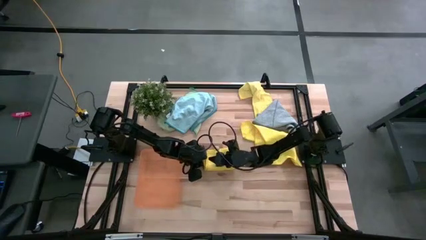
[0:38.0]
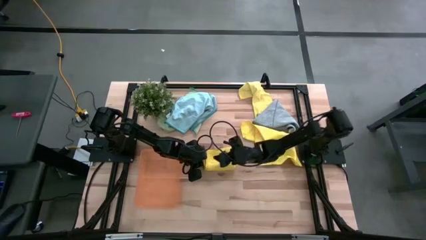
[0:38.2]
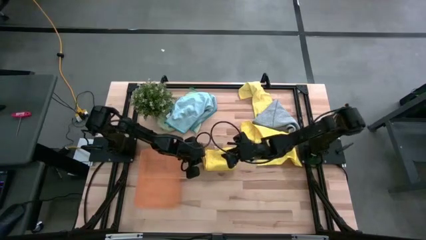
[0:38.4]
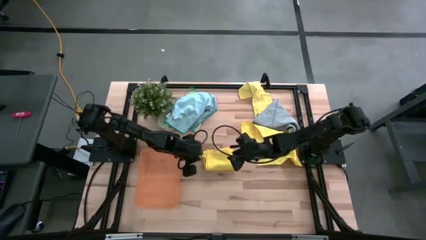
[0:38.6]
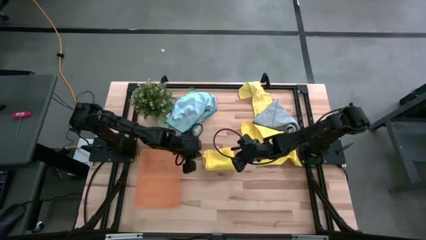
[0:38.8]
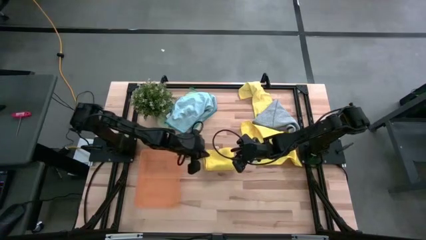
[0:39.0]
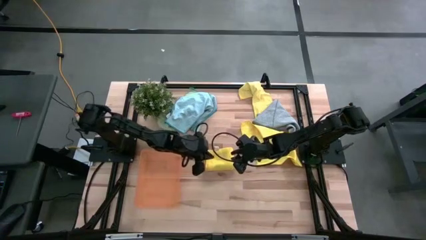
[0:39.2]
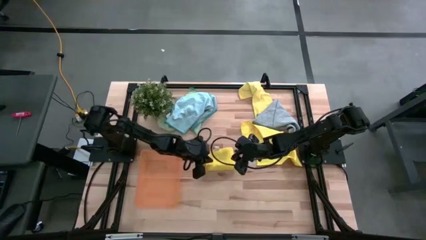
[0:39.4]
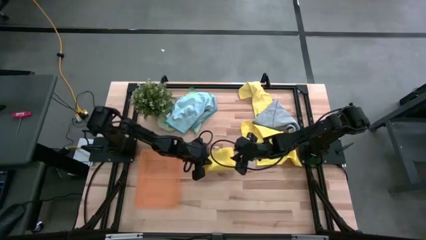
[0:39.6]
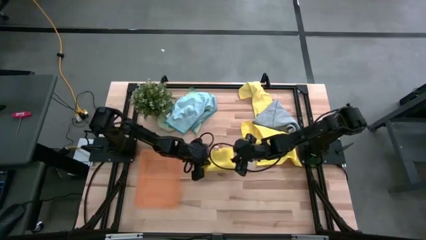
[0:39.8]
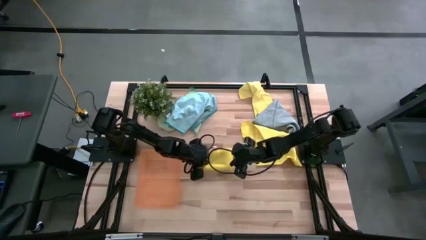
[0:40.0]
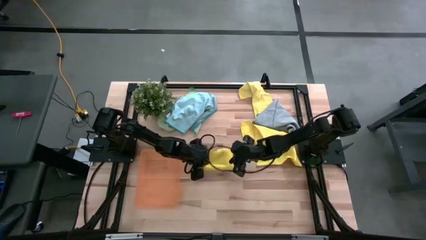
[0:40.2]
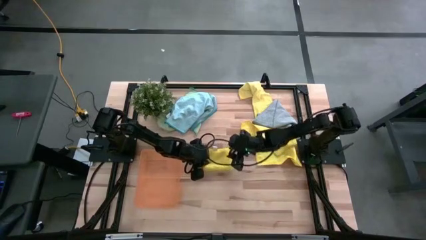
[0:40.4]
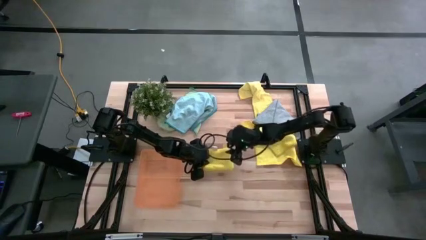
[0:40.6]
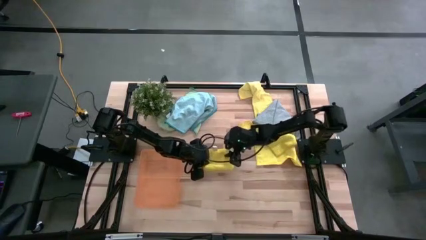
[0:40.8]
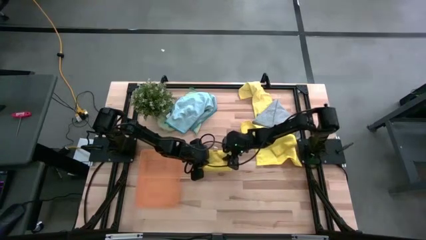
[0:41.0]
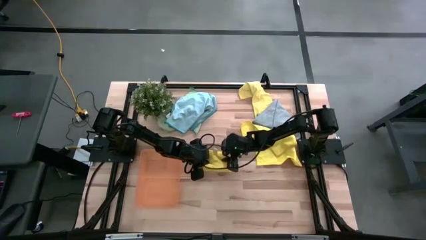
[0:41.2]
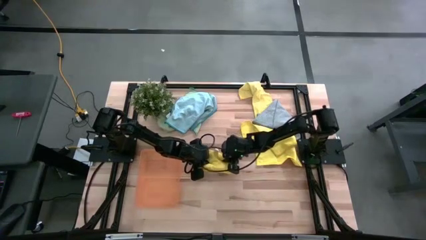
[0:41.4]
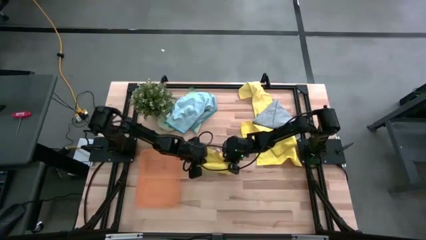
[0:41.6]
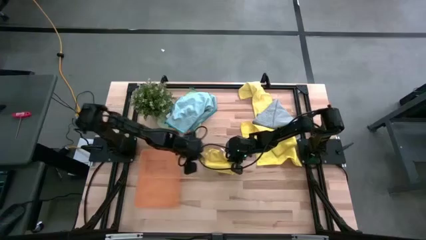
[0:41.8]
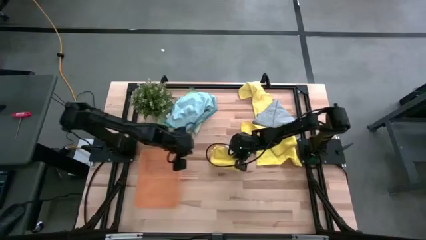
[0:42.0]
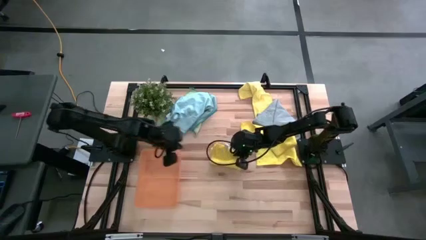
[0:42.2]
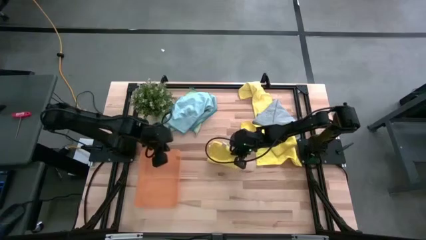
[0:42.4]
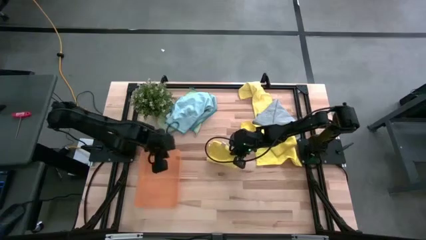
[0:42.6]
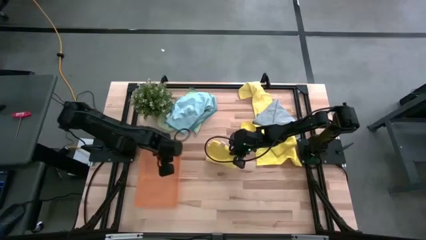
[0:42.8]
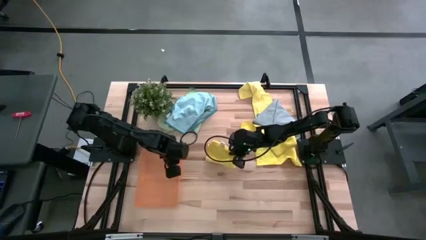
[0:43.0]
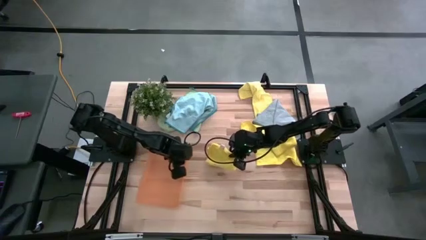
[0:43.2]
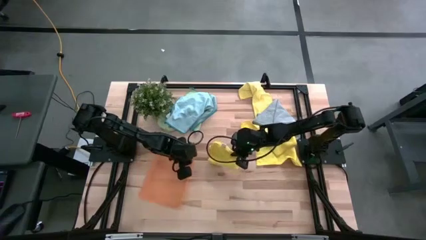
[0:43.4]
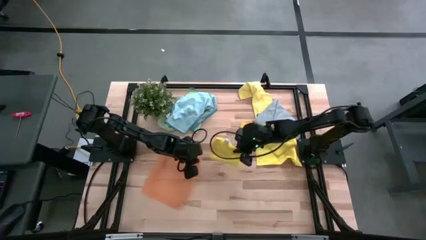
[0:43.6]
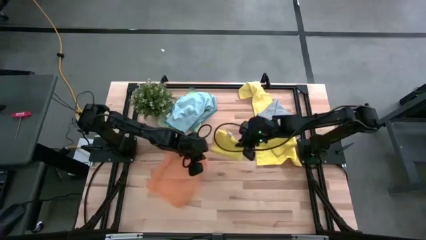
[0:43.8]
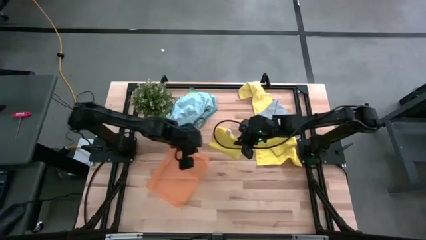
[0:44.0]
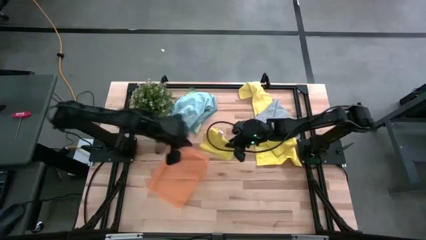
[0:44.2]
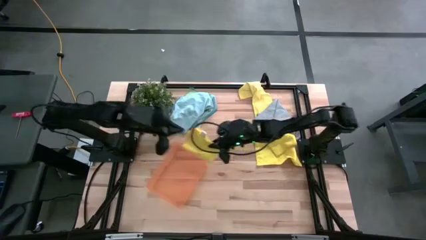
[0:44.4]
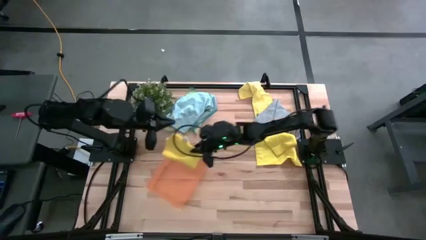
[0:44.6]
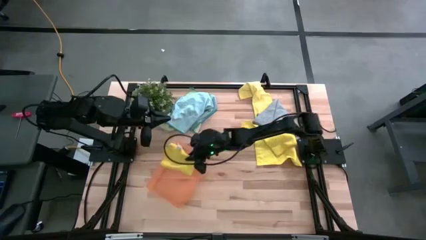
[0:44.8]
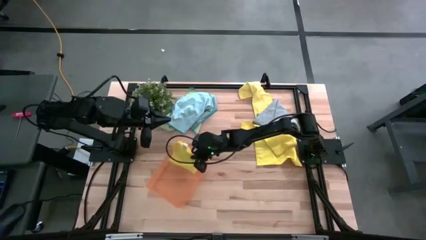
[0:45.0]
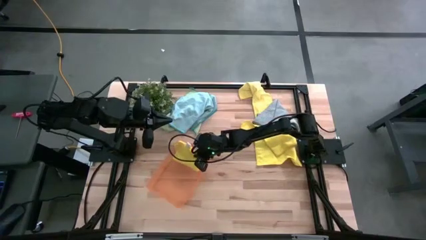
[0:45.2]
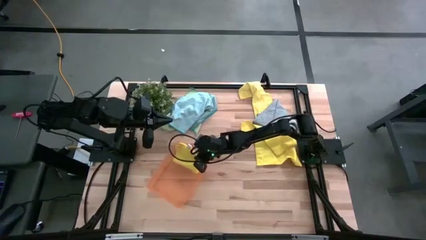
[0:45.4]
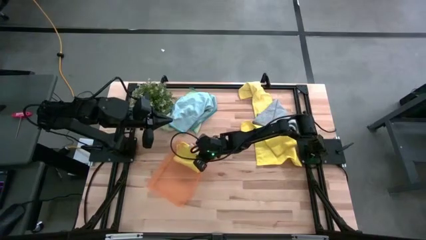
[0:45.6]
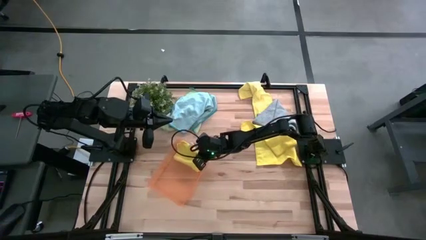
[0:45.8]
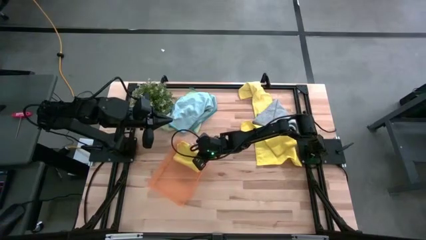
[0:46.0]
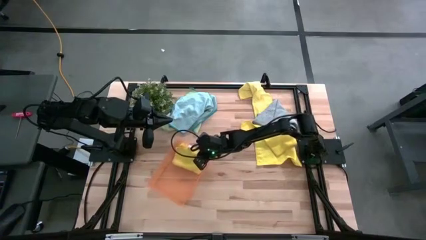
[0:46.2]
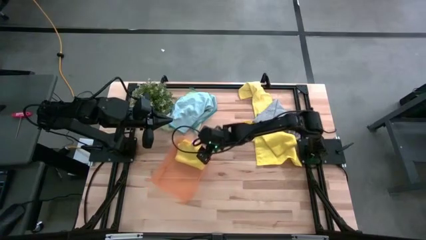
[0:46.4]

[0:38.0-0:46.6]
Task: Fold microfiber towels
Put the bottom yellow folded microfiber towel into the orange bin

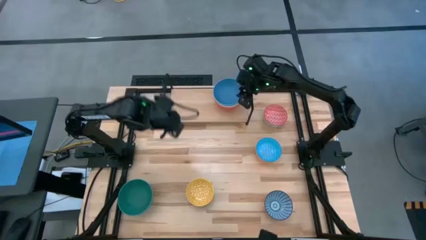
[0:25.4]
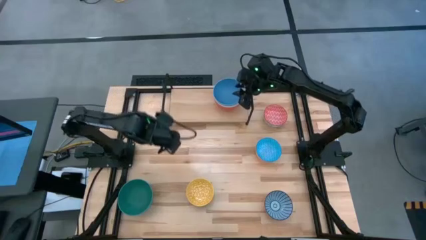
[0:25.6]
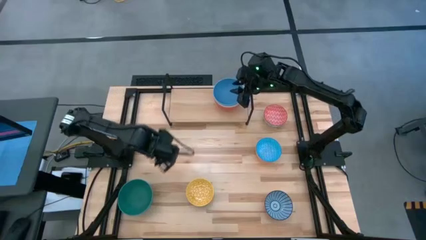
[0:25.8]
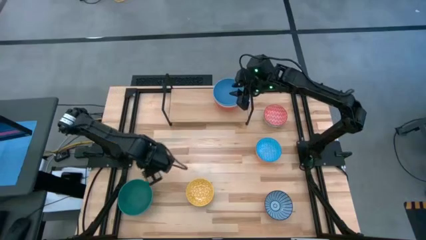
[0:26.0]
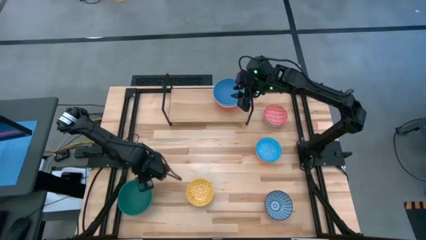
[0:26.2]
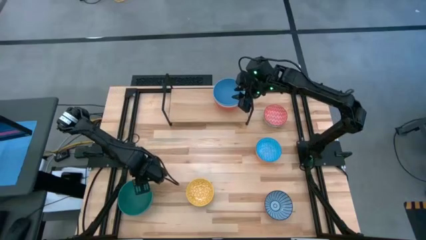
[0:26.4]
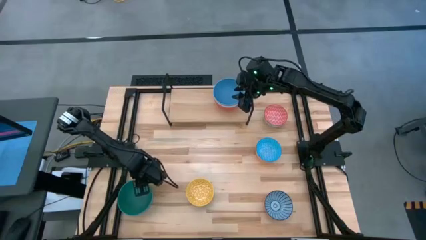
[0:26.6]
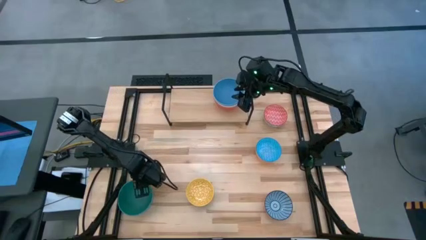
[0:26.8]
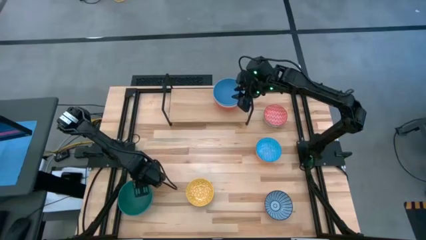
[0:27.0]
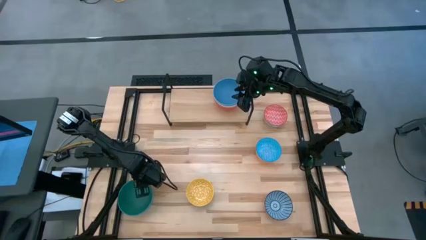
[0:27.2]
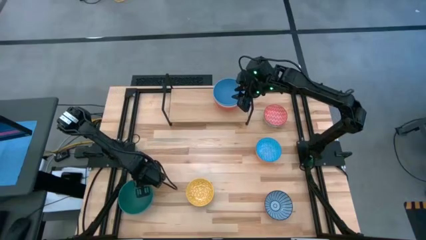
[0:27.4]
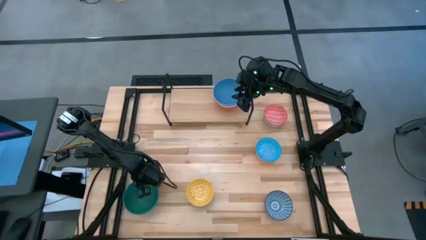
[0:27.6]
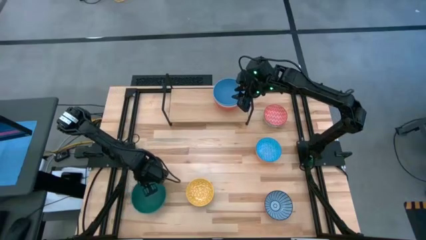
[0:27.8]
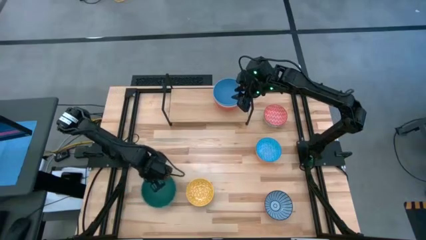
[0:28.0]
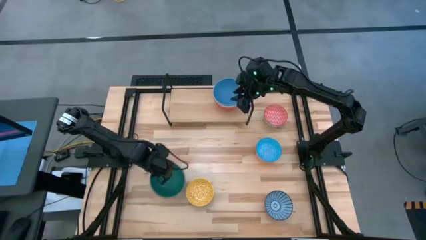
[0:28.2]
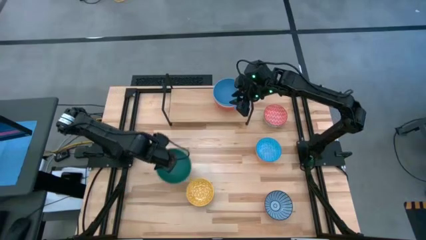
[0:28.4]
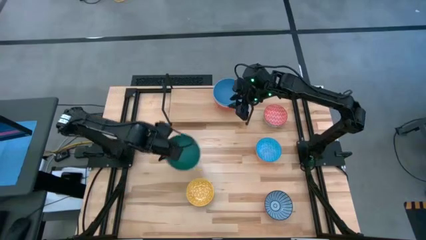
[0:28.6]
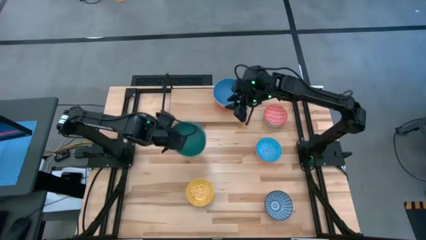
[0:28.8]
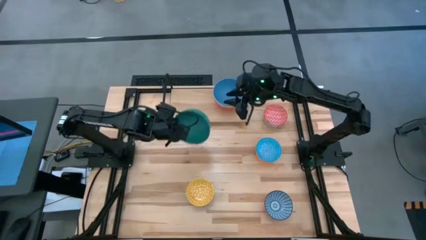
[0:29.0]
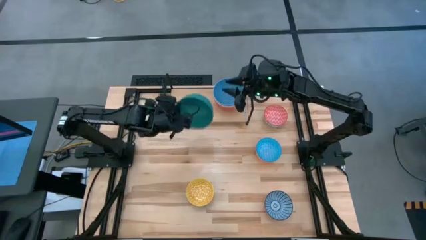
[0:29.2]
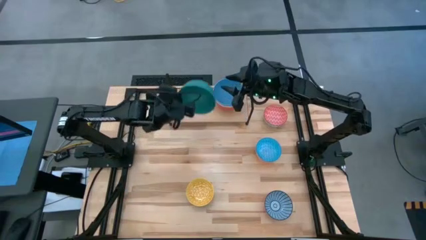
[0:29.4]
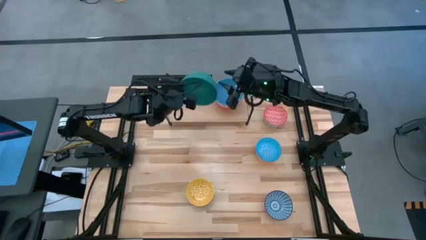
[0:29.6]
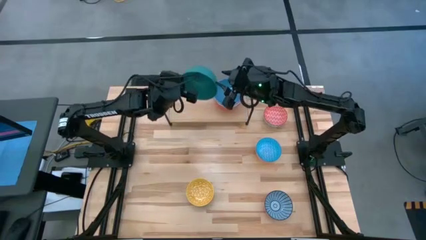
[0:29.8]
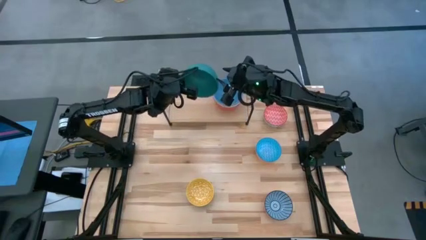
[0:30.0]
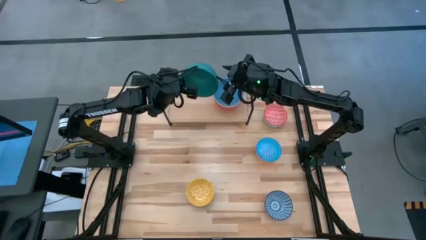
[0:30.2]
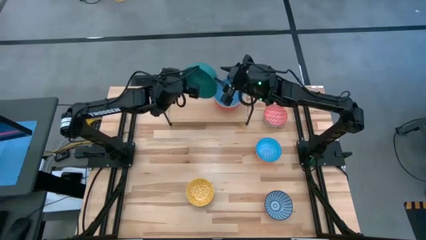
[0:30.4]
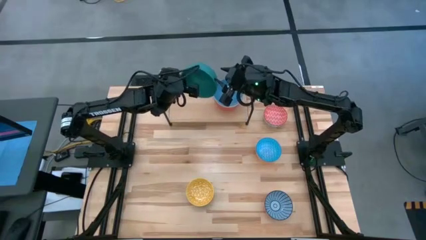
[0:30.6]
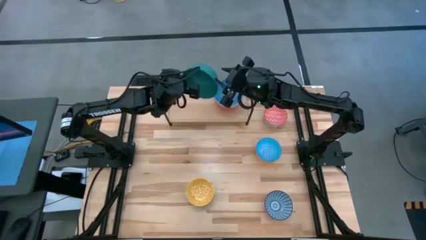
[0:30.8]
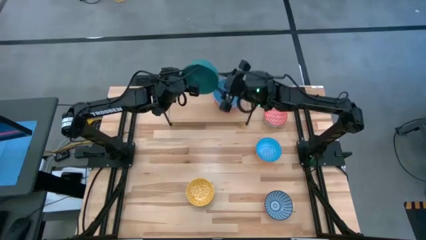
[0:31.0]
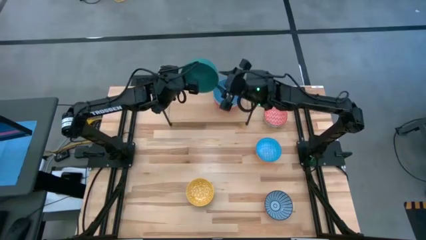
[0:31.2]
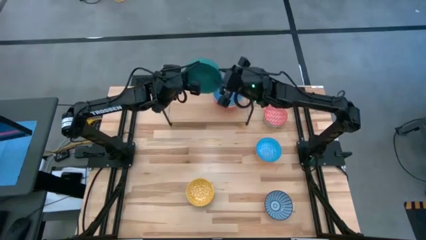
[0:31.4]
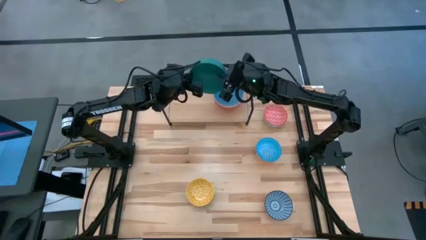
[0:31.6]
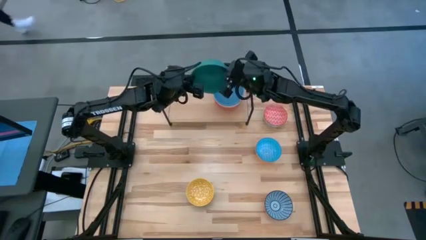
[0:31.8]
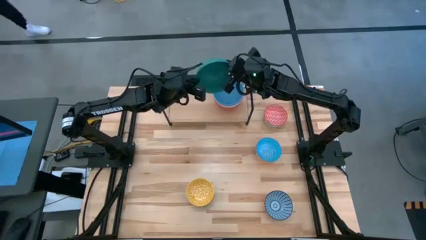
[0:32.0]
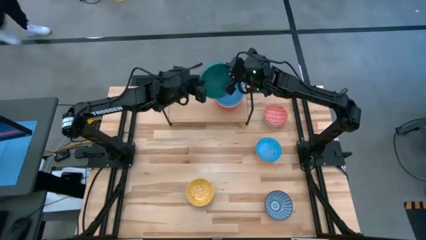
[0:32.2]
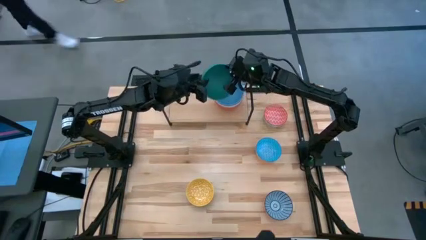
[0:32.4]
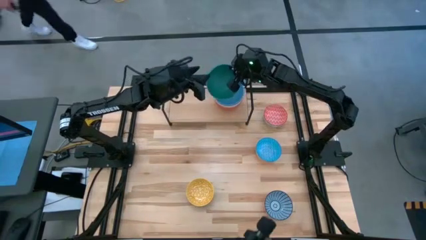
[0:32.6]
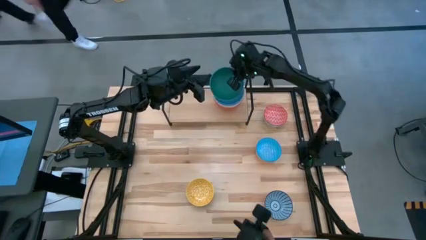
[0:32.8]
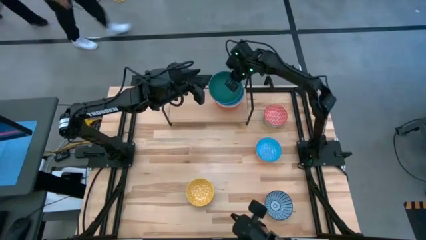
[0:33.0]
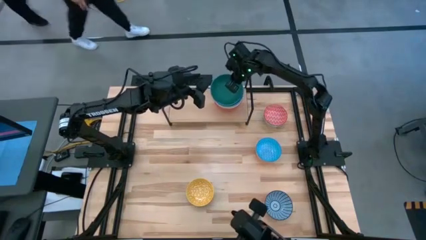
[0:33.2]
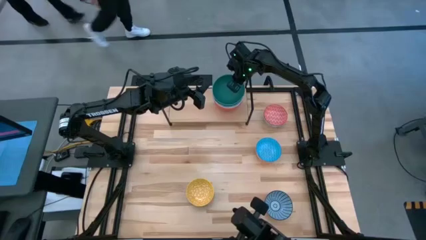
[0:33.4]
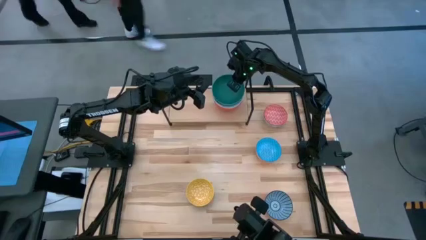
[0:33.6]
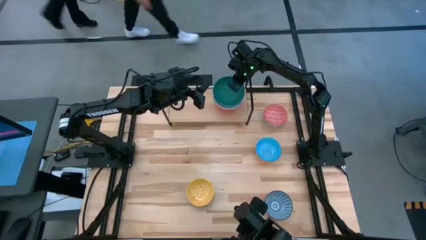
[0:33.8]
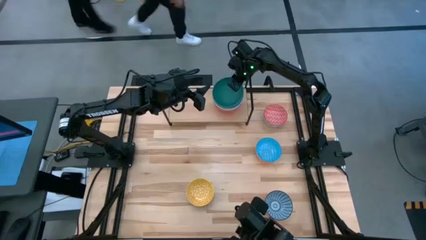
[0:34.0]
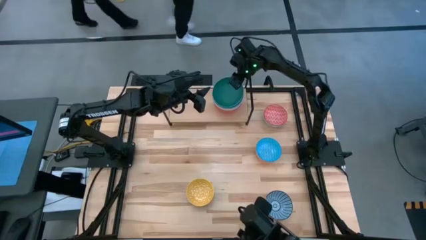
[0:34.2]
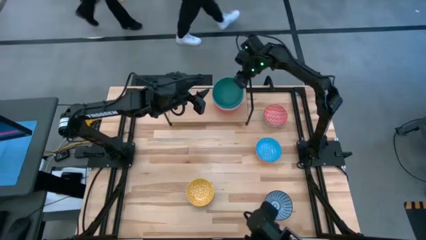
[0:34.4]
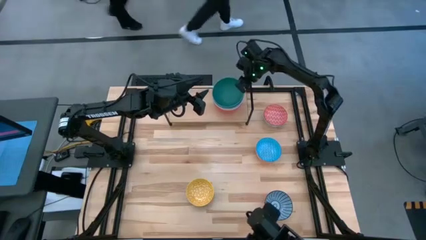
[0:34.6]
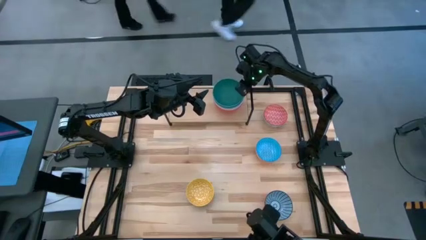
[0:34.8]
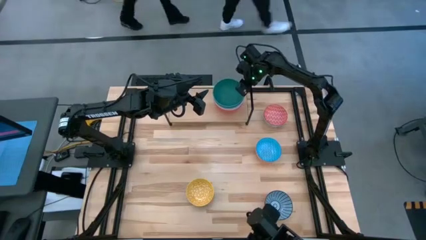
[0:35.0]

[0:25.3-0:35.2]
Task: Place and stack bowls onto a shelf
Stack the green bowl on top of the blue bowl on the shelf
